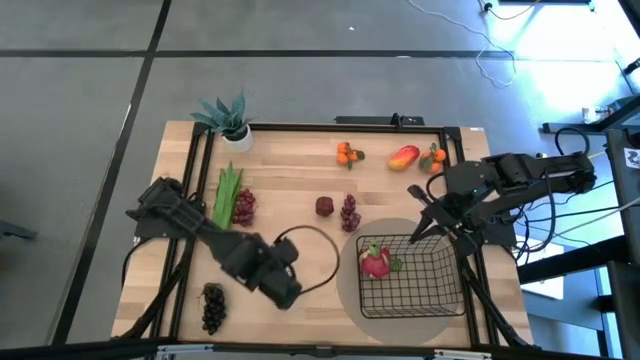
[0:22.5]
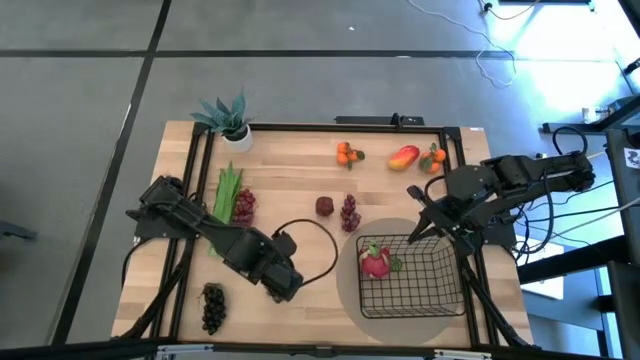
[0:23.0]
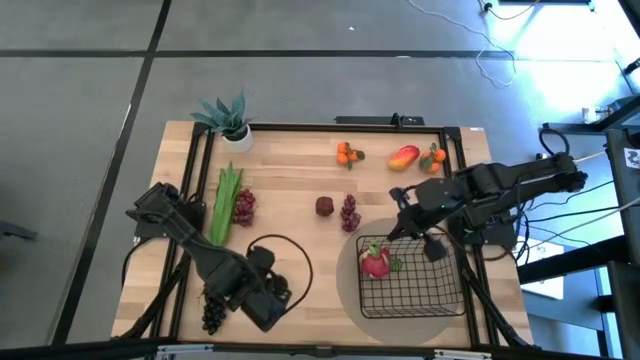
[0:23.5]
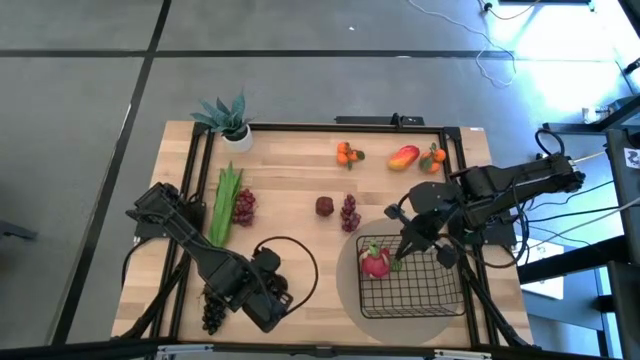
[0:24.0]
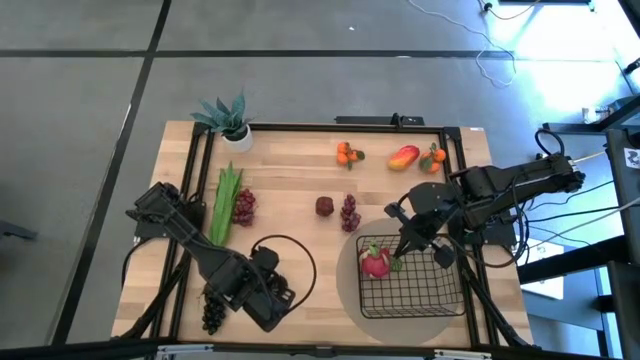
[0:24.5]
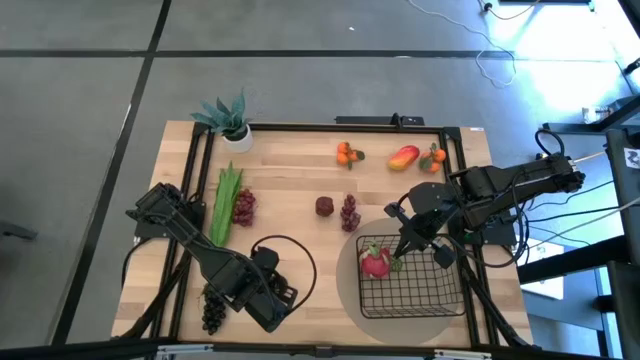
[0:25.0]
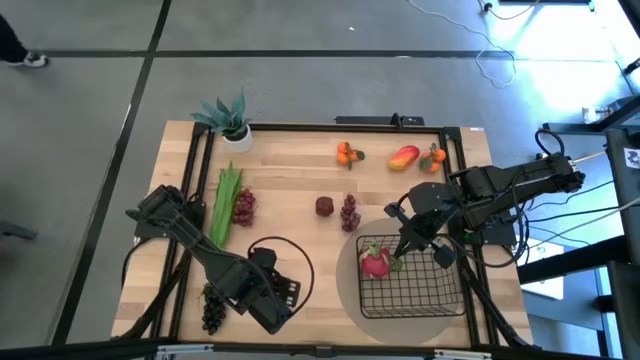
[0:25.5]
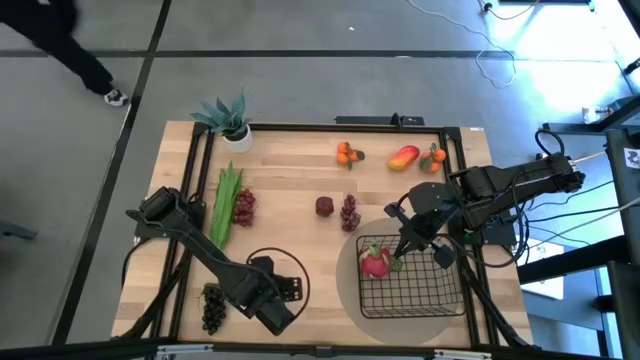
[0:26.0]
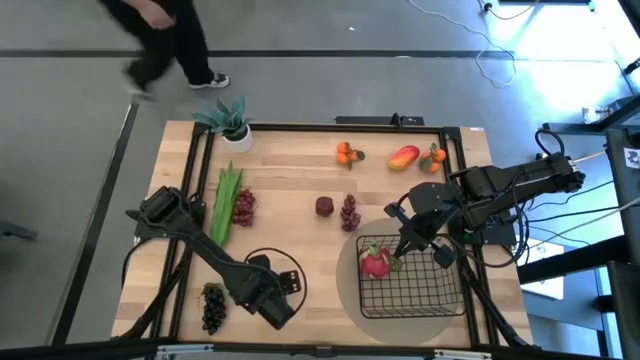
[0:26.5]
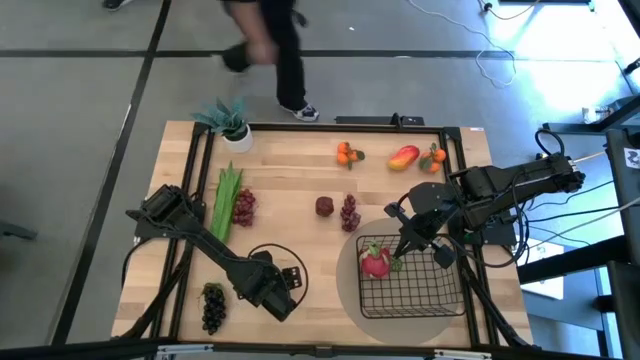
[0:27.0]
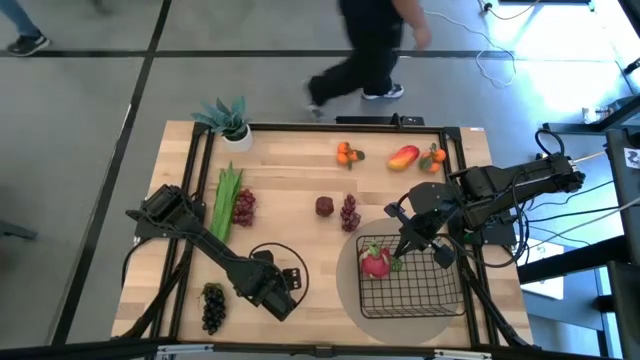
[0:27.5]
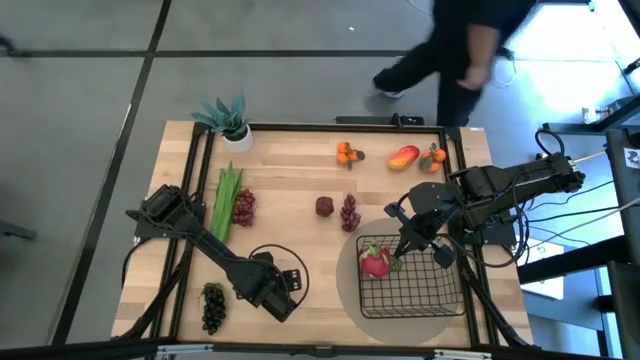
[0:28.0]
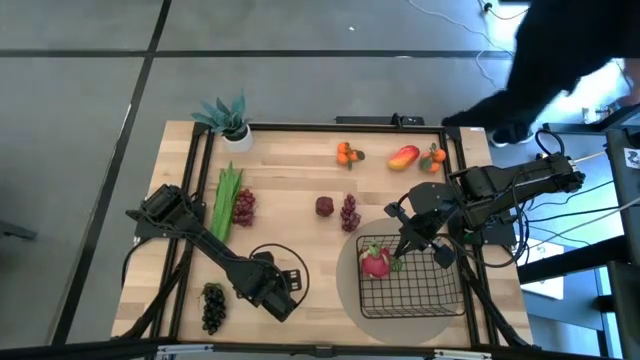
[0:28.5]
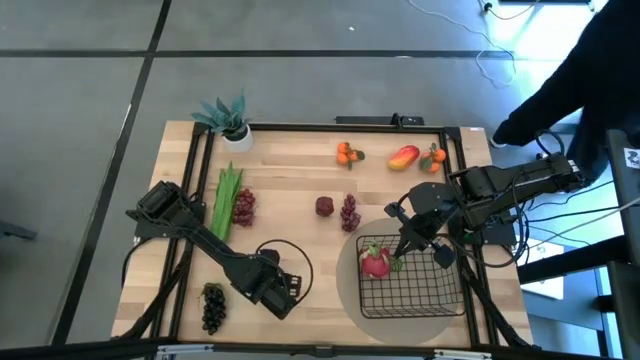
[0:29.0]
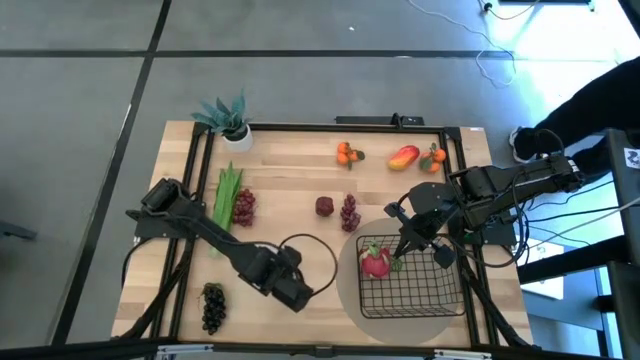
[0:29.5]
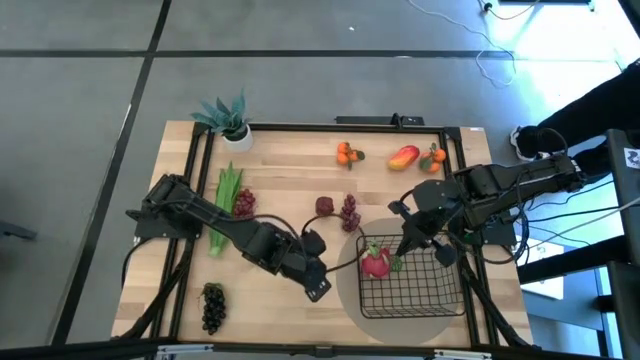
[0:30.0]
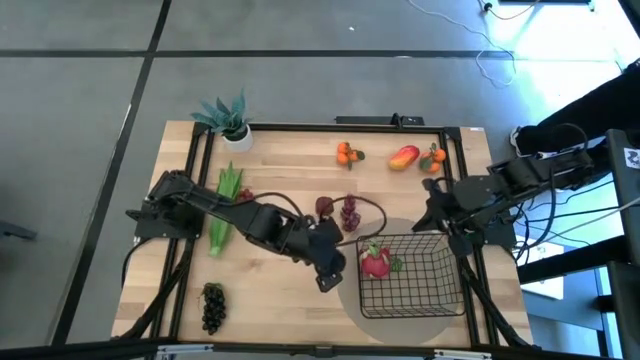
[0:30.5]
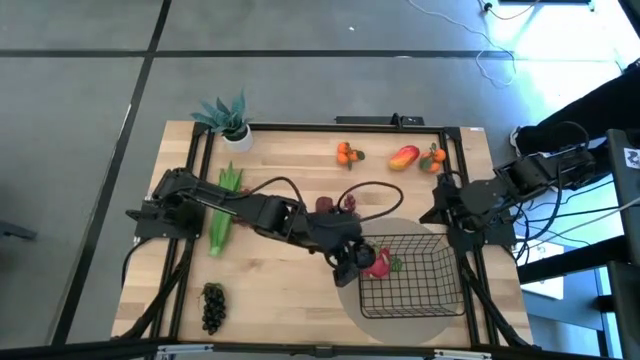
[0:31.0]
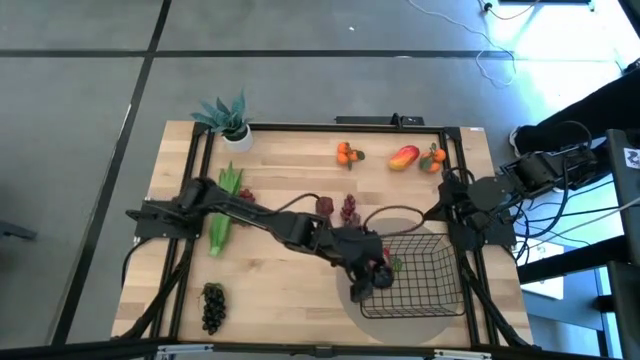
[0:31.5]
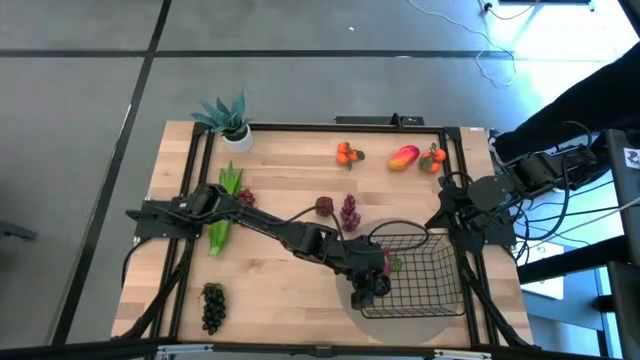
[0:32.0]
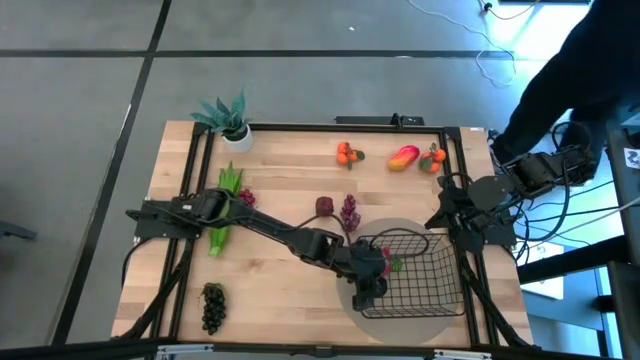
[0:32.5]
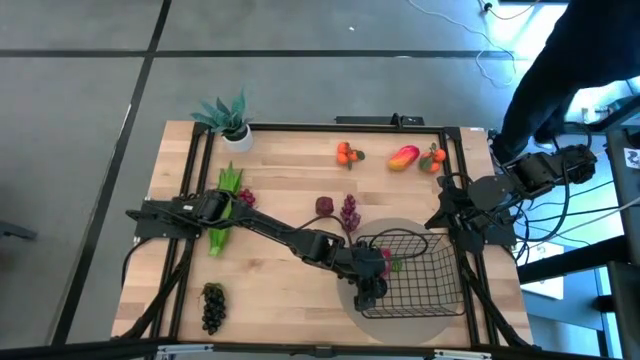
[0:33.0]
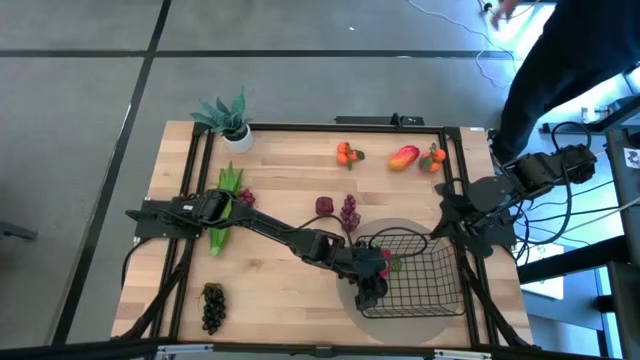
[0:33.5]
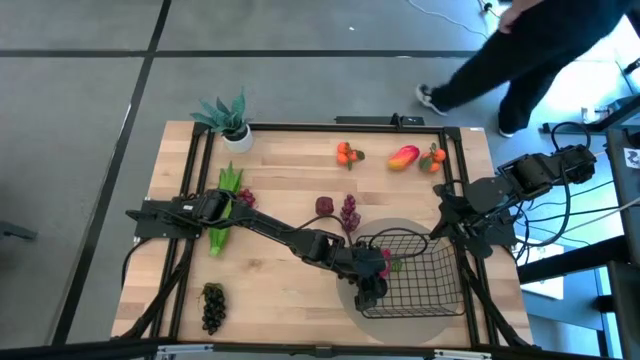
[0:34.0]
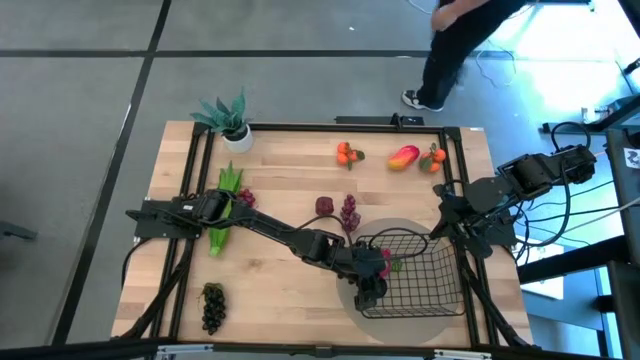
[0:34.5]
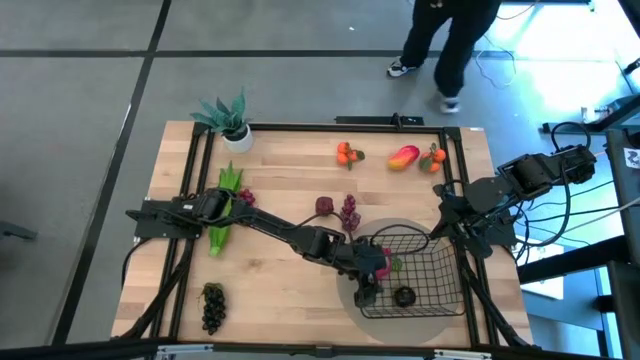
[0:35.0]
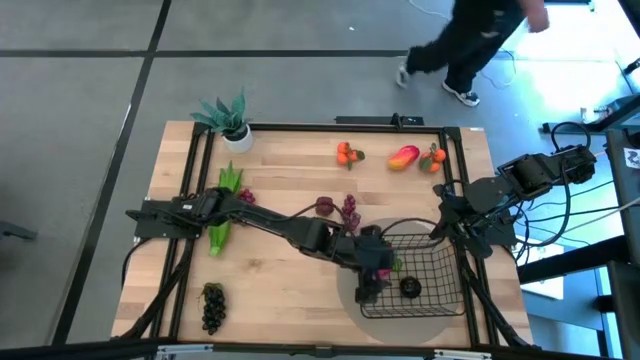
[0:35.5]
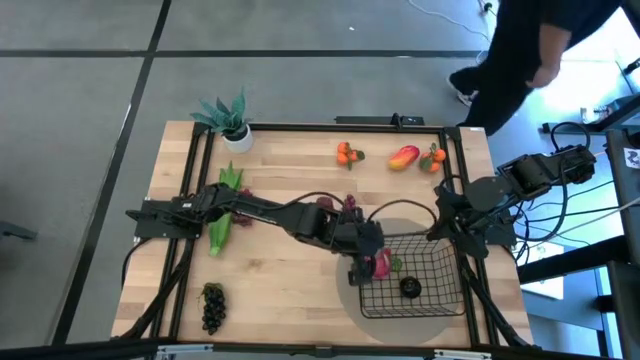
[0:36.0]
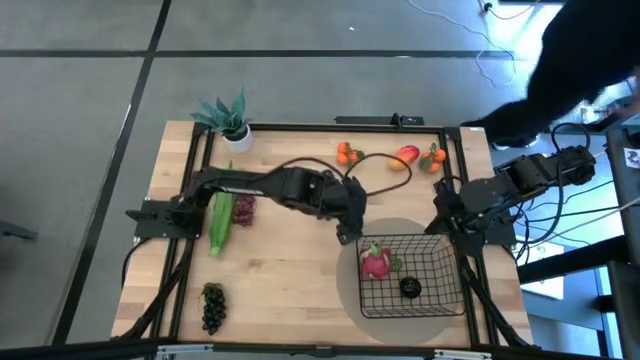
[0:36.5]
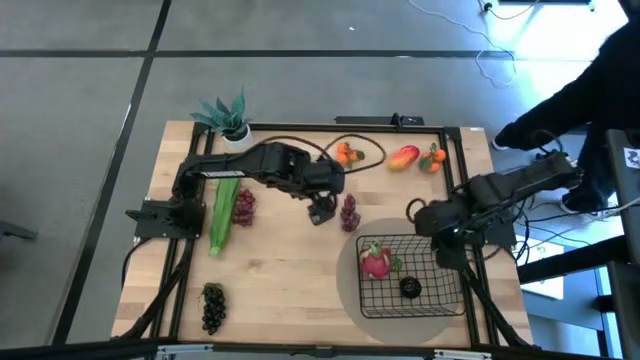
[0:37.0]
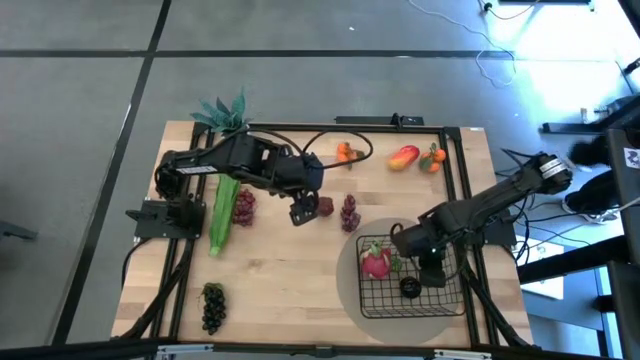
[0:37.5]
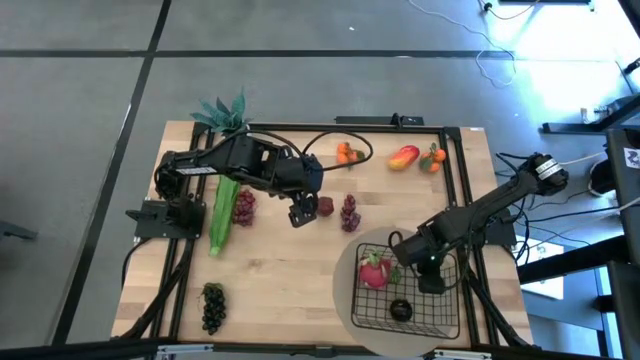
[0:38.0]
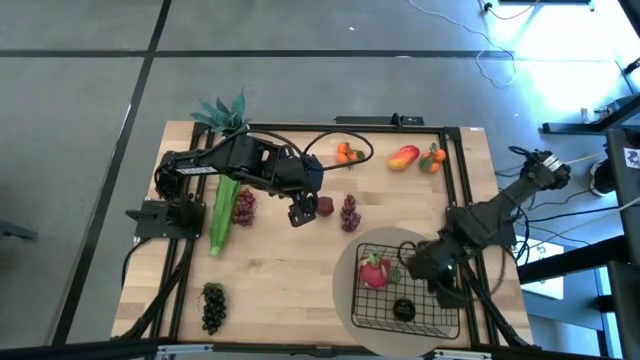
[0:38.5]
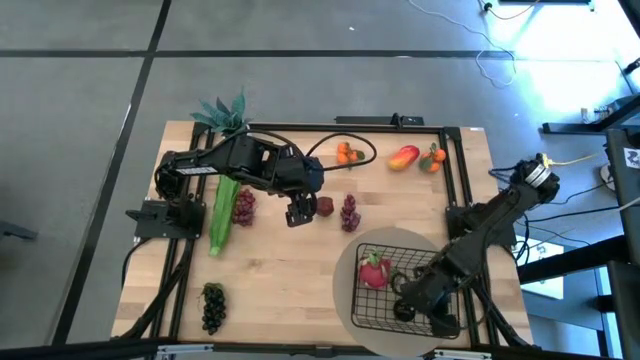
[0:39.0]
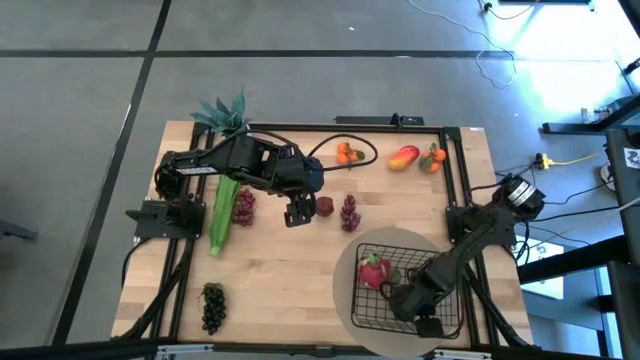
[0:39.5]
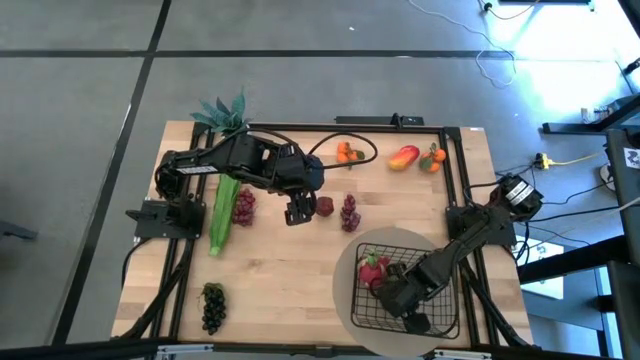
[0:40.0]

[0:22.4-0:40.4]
Task: Build produce basket
Put the black mangosteen into the black wire basket

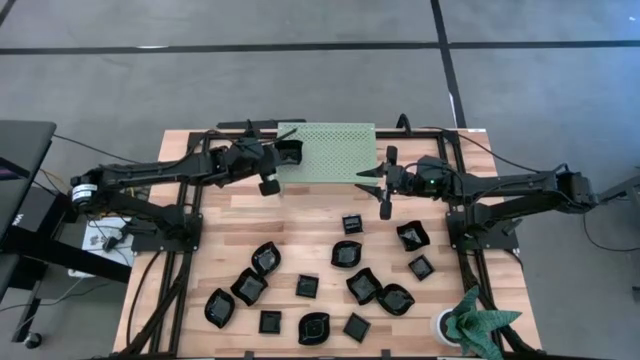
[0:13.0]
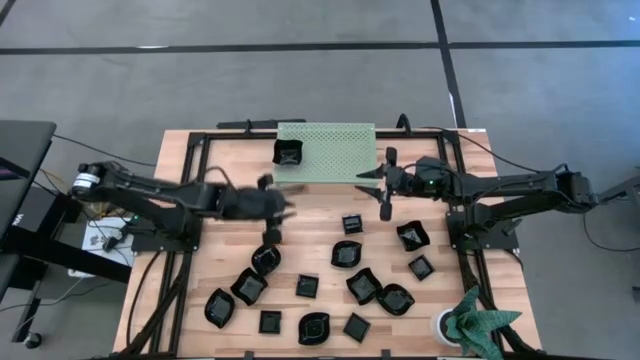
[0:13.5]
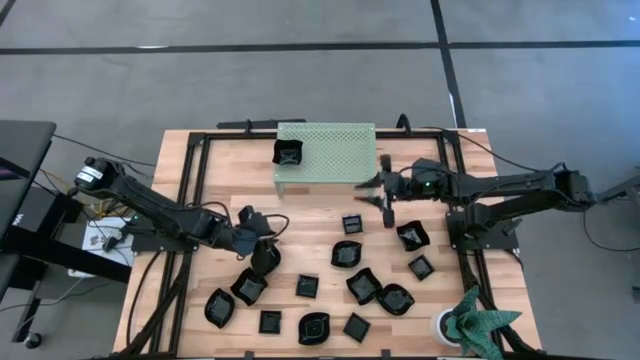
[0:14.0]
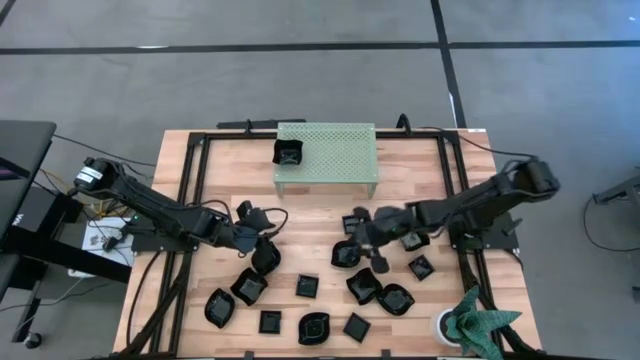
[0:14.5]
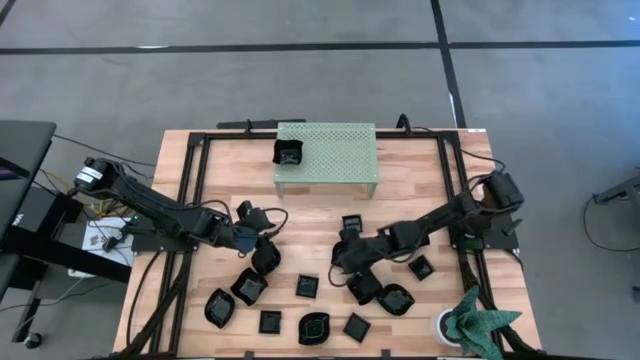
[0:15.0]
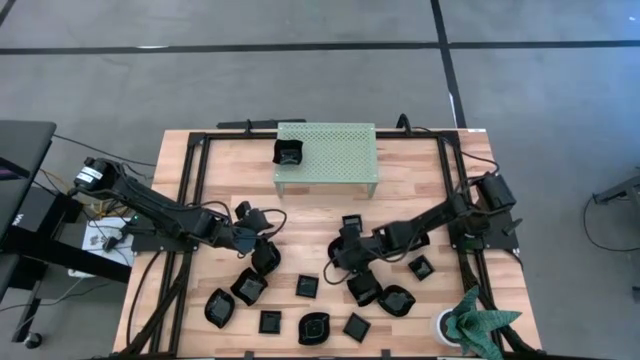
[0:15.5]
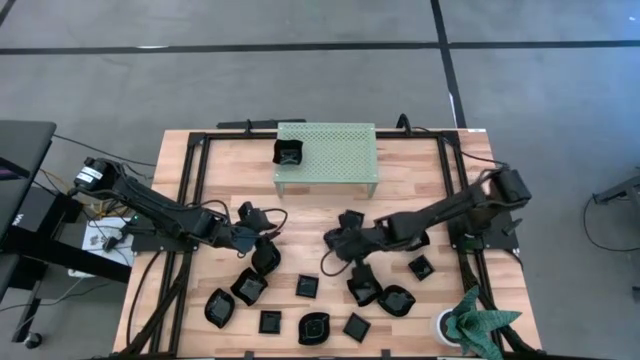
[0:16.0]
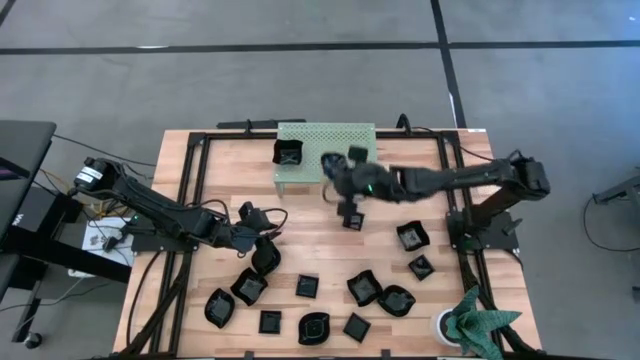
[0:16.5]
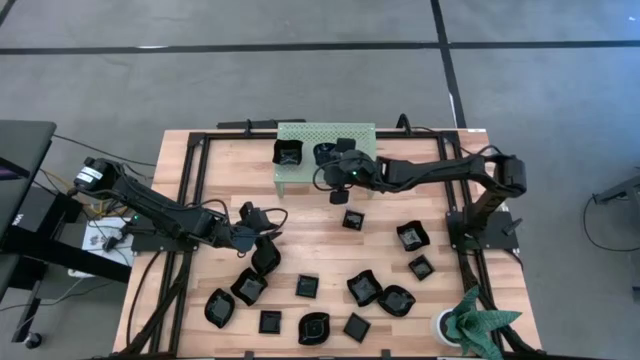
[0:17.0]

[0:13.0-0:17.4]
Task: Pick & Place Mini shaped plates
Put the leaf-shaped plate on the shelf
